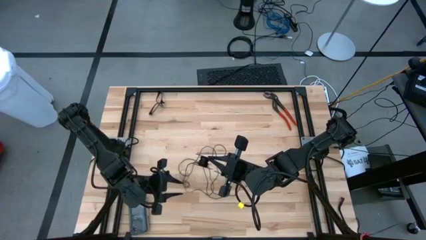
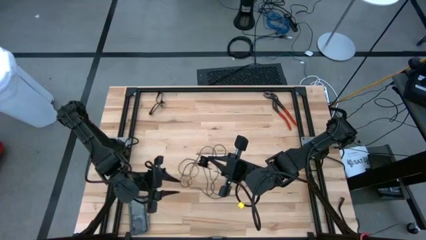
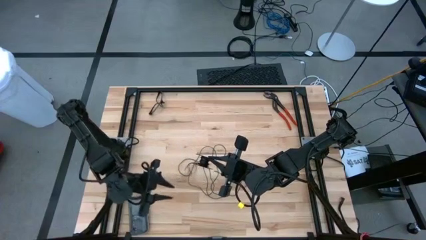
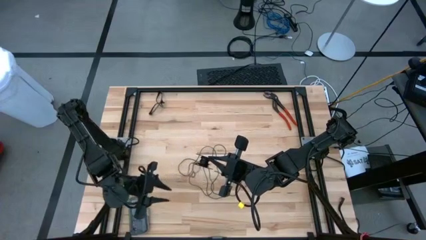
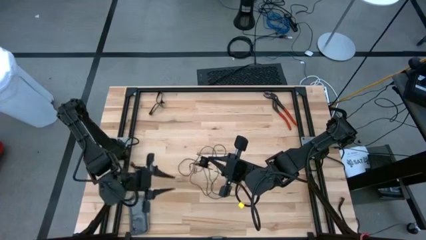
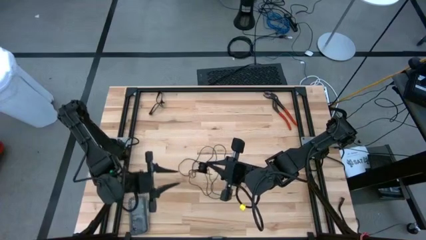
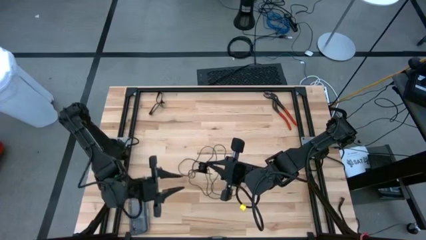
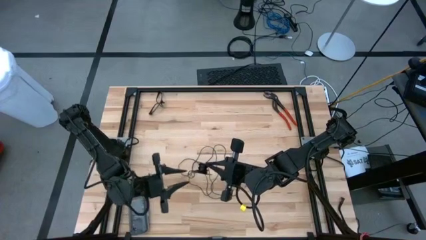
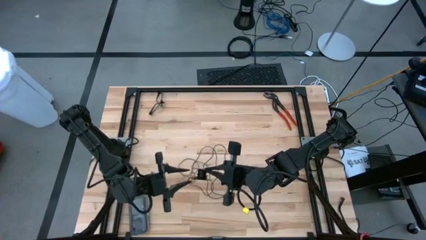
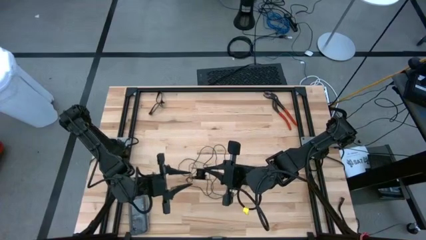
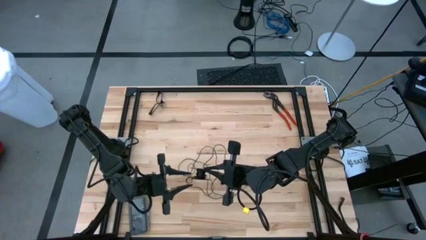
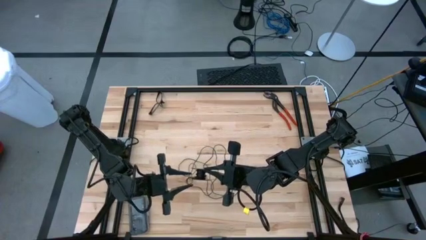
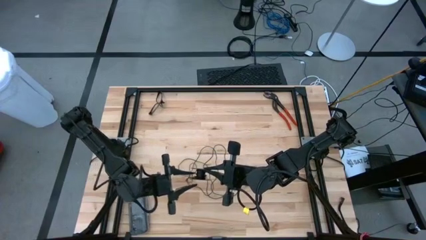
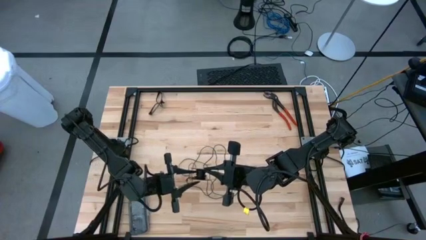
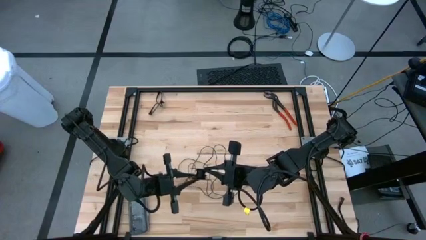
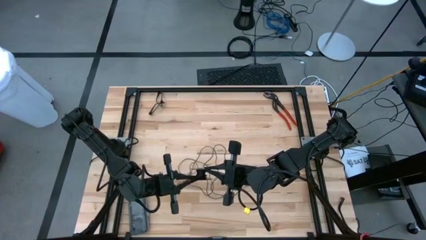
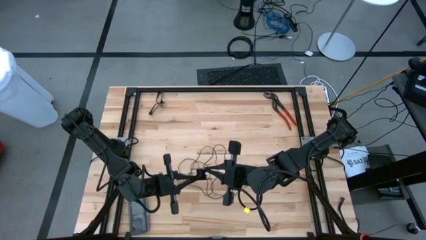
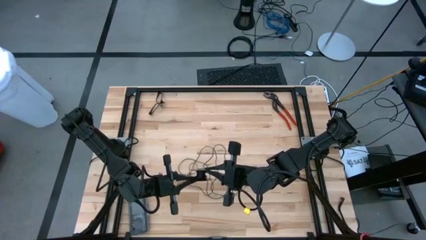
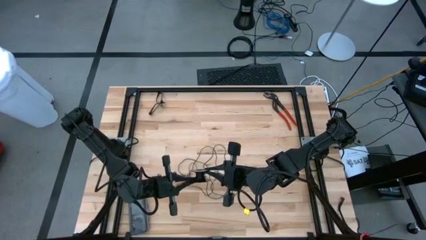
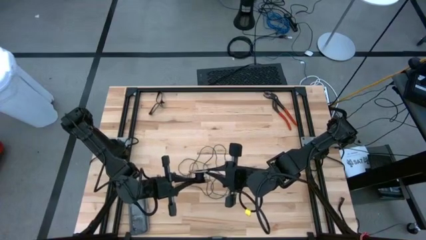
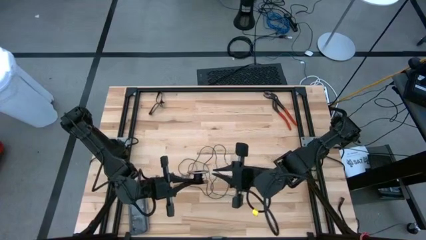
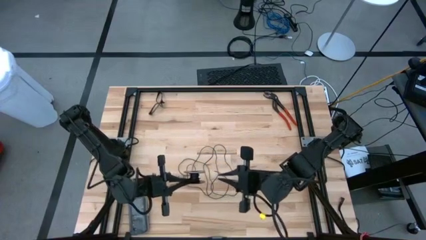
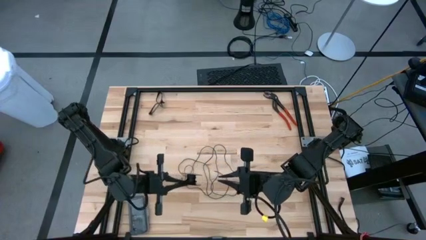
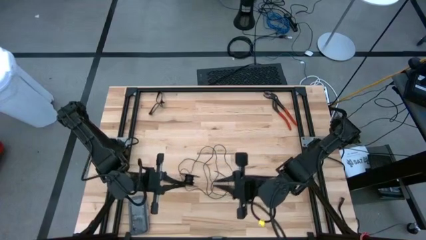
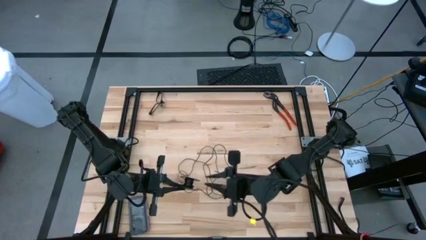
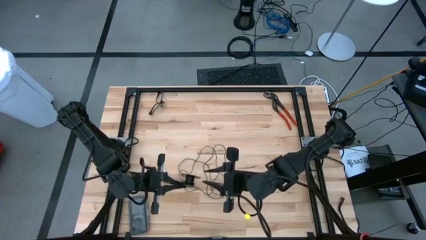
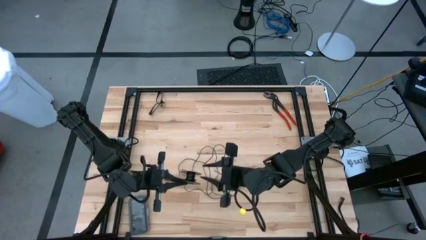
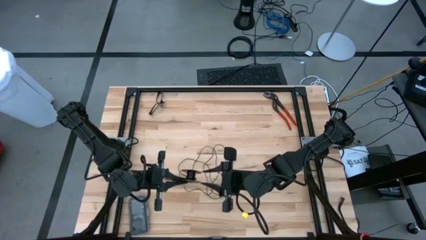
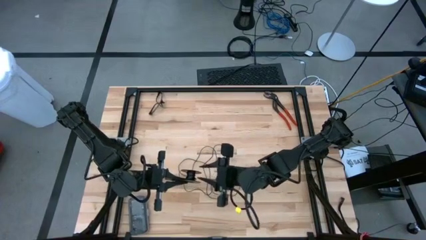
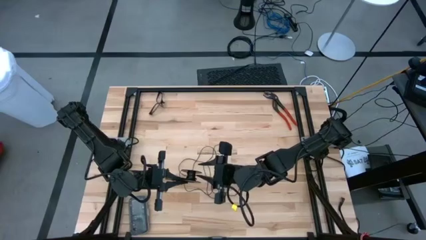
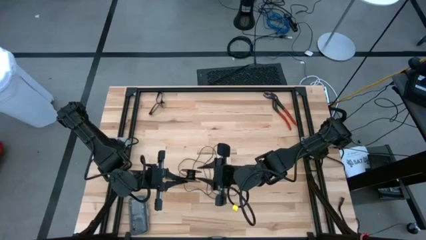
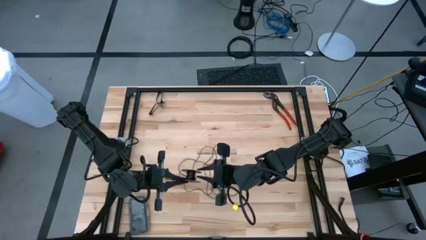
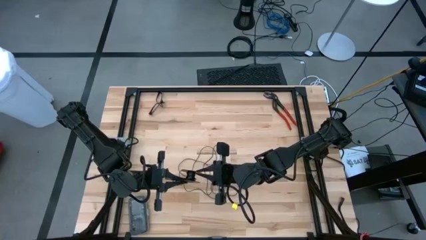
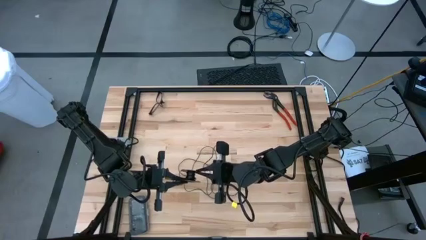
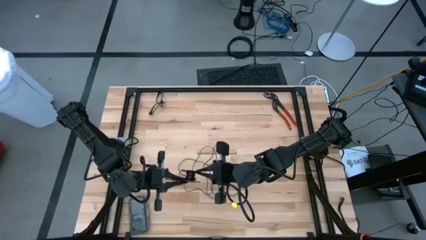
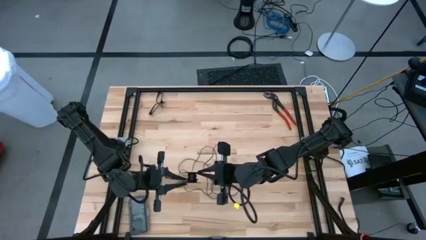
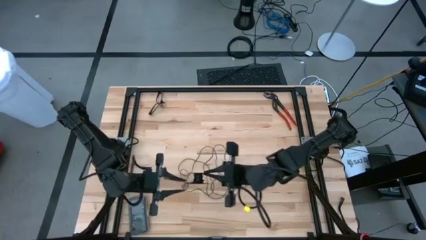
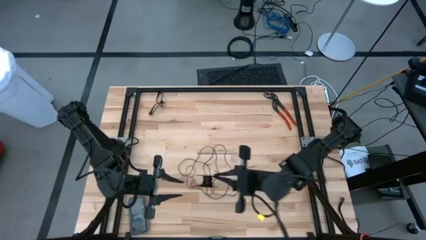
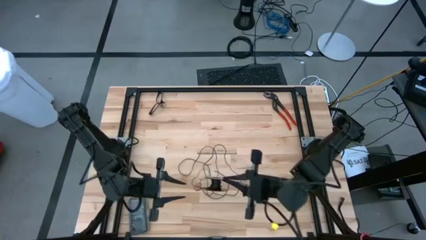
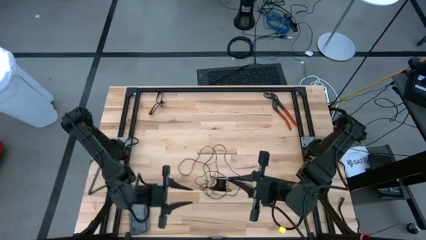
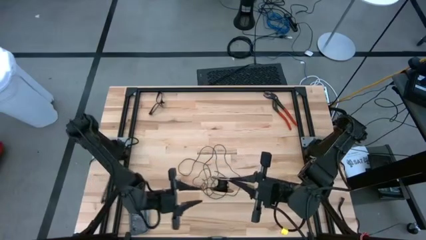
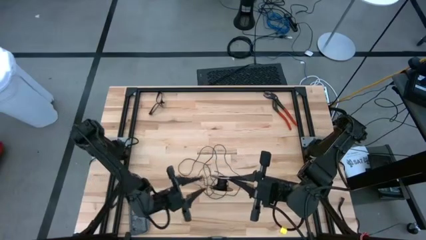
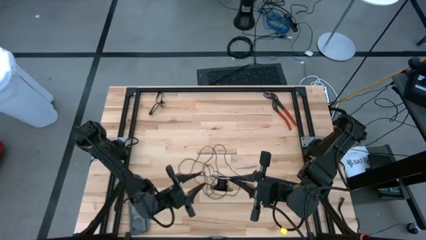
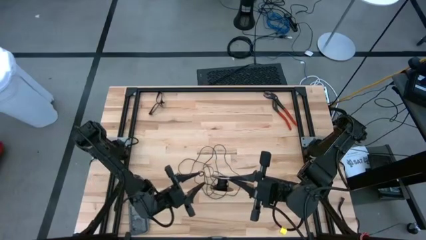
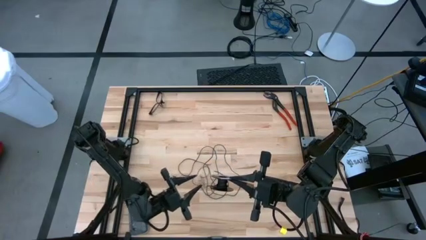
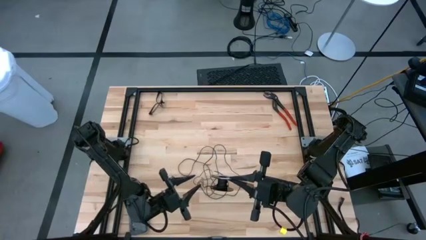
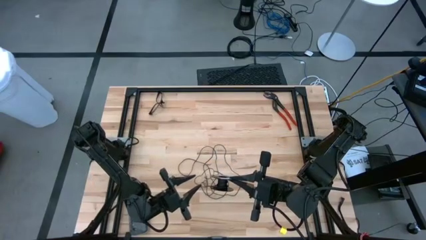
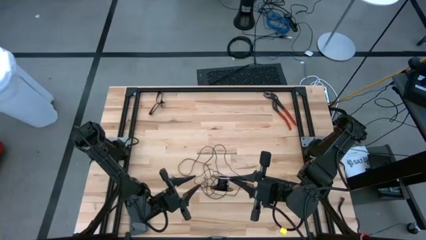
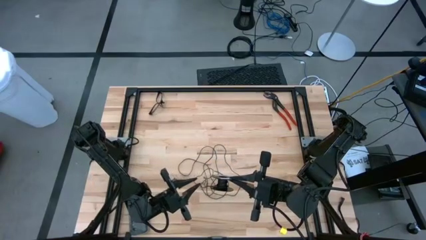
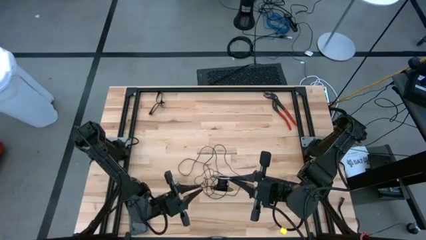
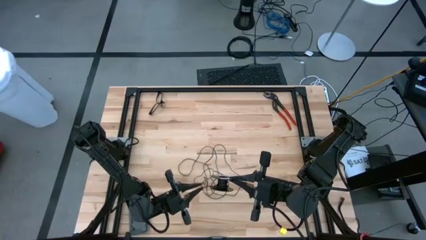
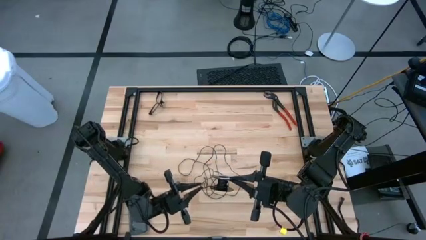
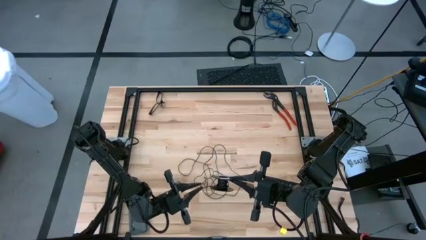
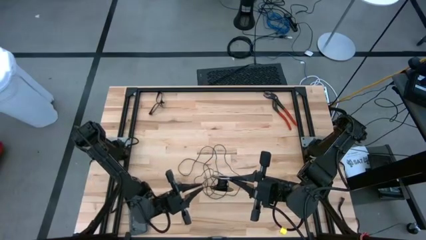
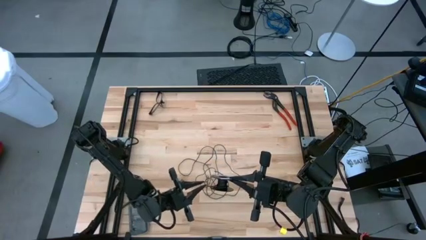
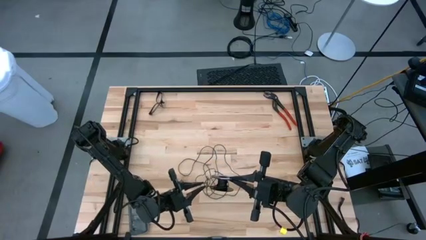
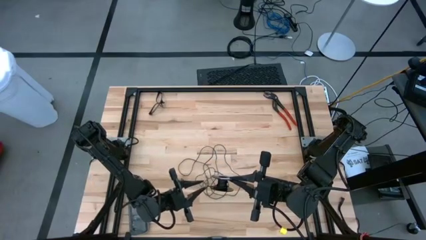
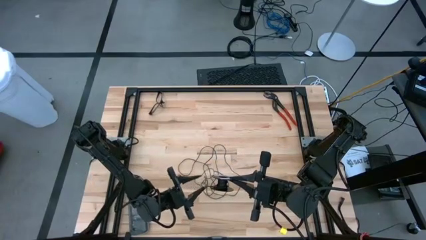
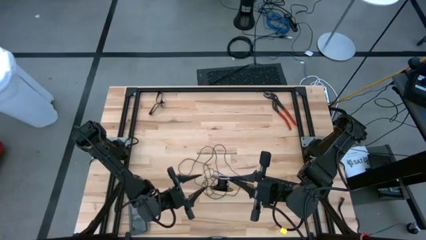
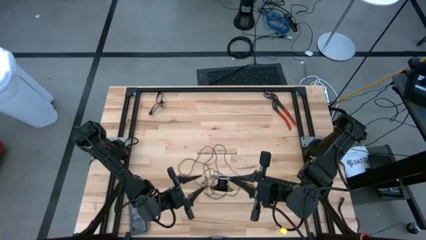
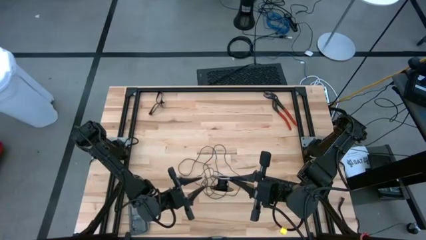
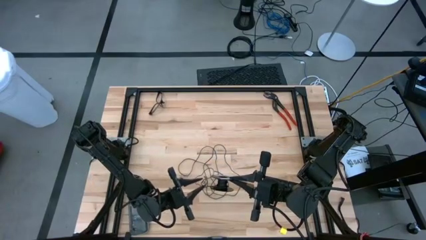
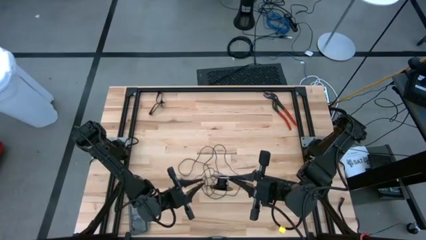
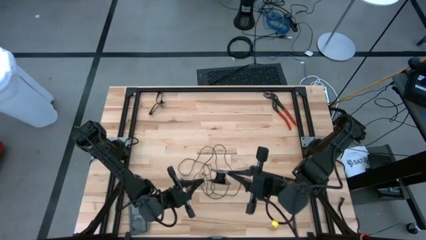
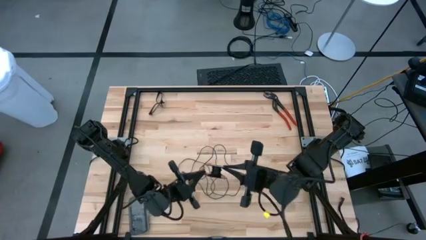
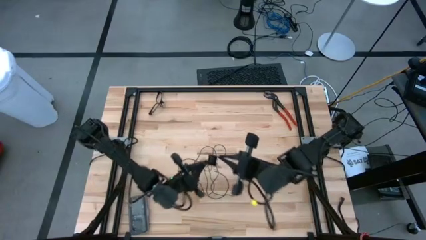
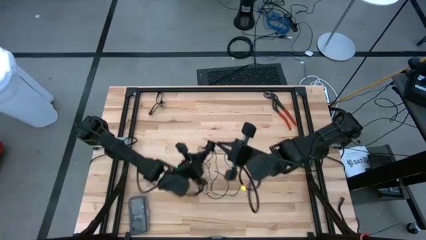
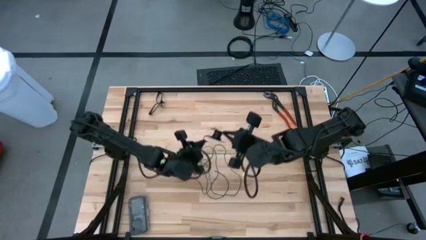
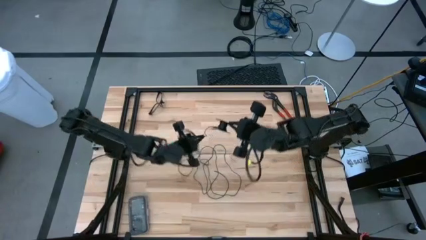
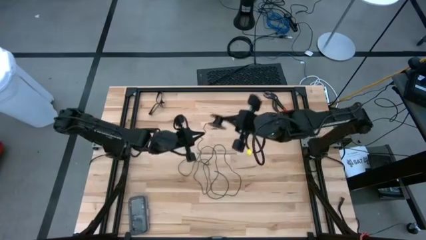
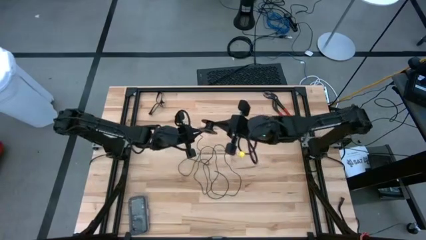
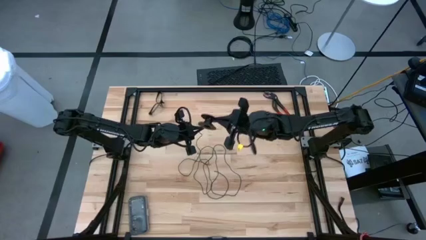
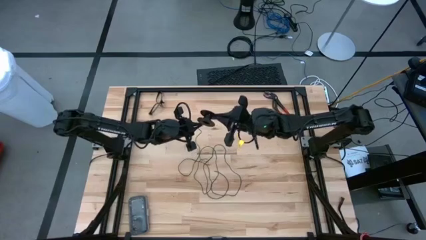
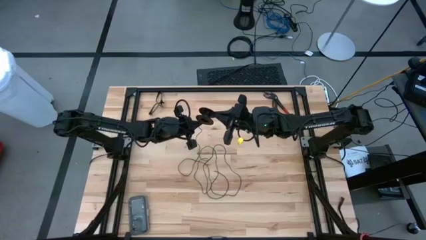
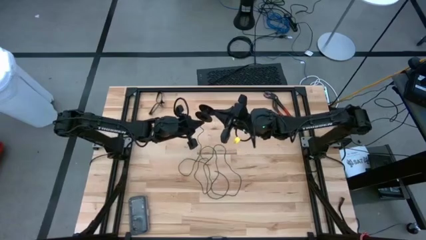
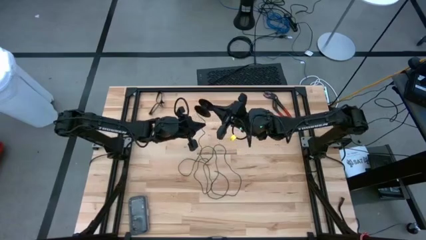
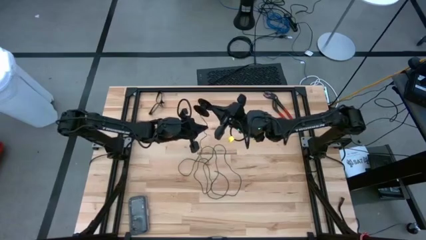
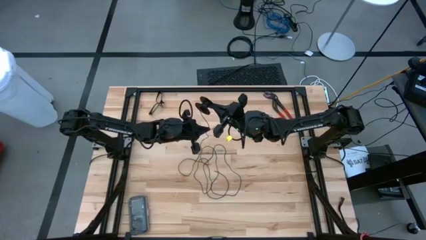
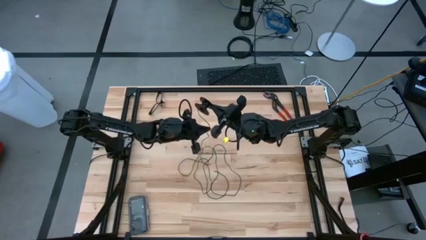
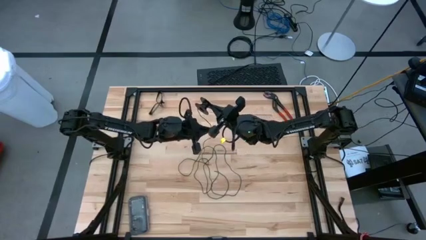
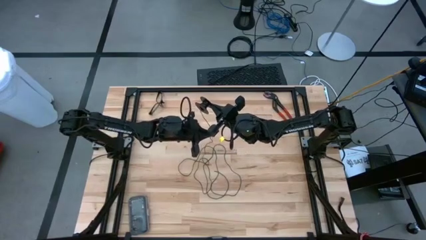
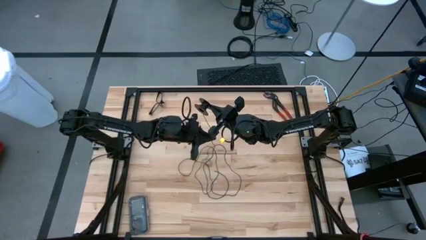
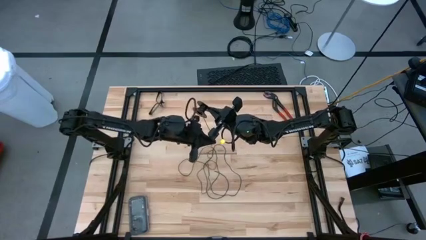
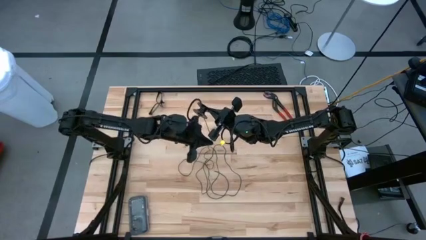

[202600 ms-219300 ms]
Task: Coil cords
Coil the black wire onto the spool
